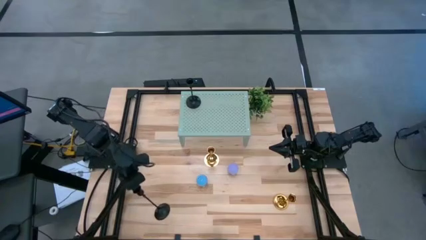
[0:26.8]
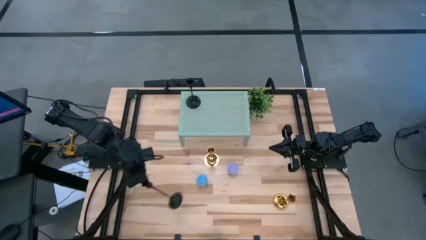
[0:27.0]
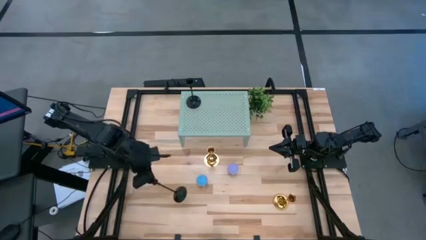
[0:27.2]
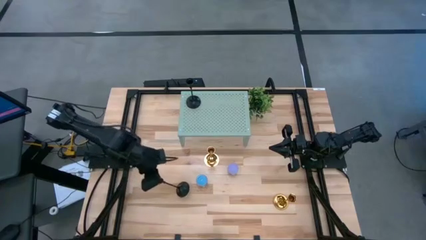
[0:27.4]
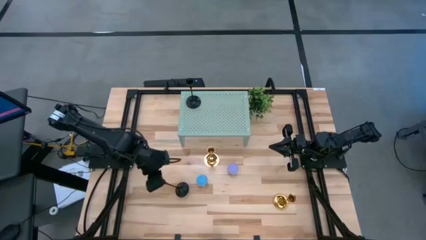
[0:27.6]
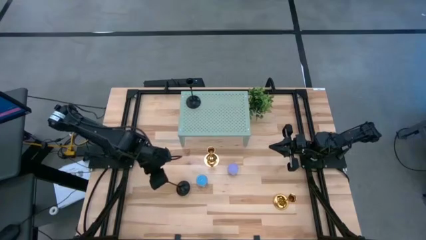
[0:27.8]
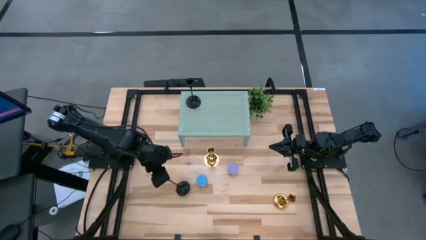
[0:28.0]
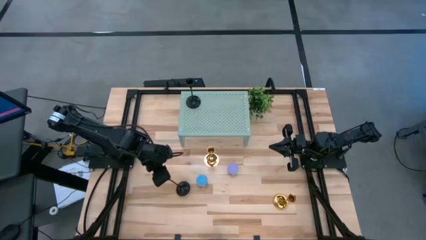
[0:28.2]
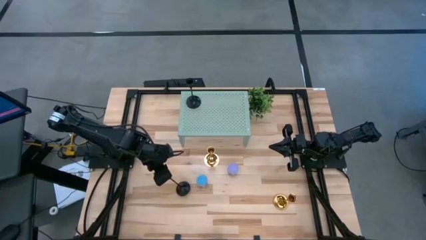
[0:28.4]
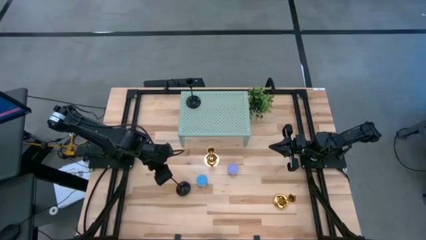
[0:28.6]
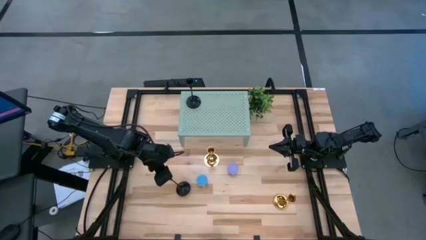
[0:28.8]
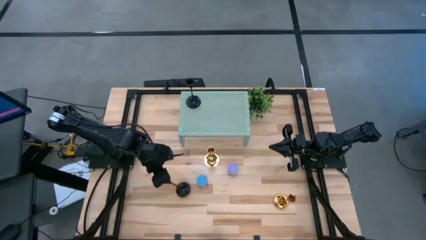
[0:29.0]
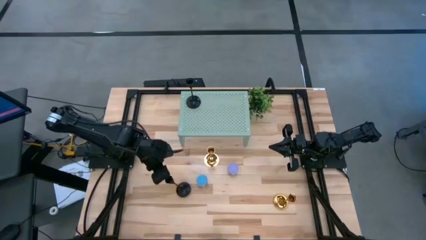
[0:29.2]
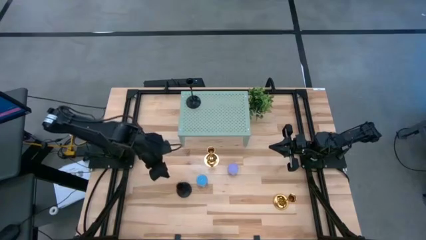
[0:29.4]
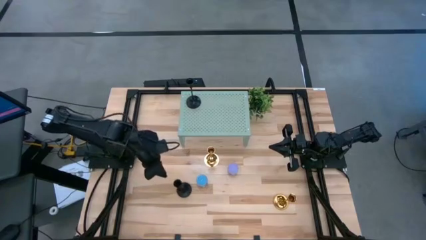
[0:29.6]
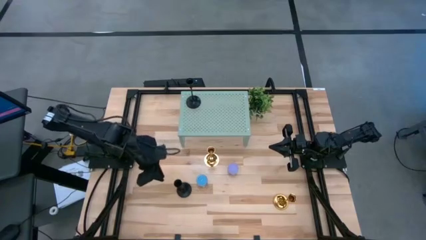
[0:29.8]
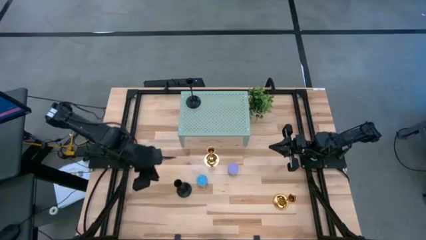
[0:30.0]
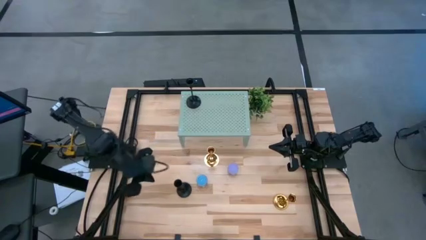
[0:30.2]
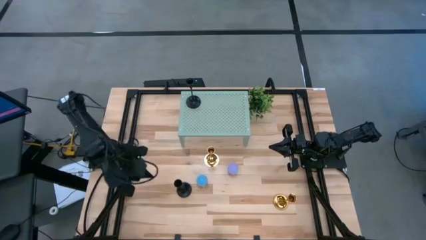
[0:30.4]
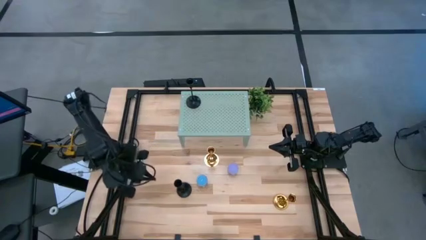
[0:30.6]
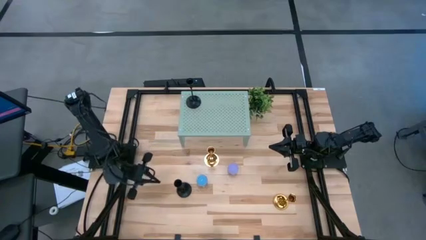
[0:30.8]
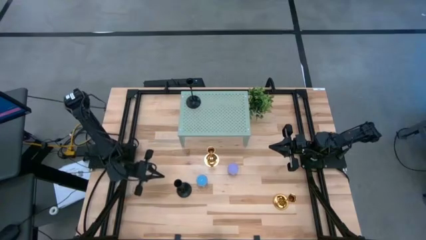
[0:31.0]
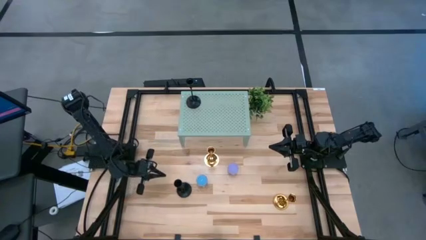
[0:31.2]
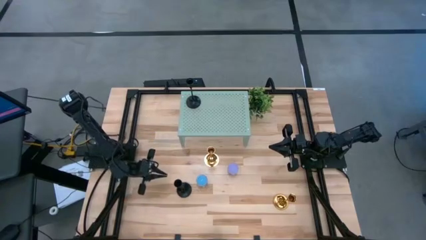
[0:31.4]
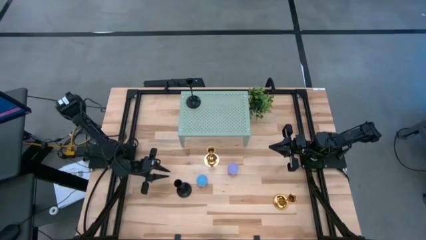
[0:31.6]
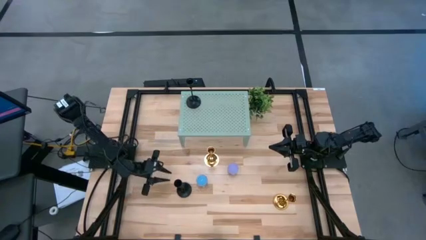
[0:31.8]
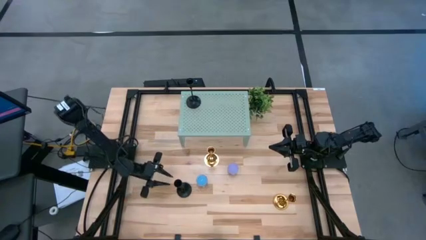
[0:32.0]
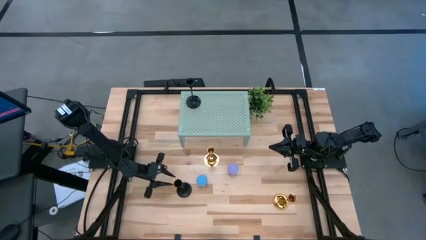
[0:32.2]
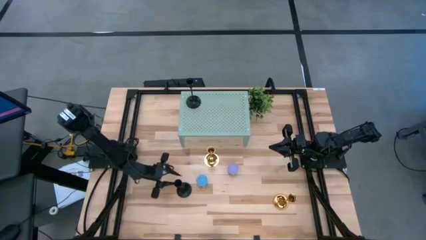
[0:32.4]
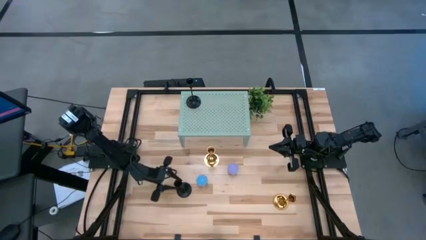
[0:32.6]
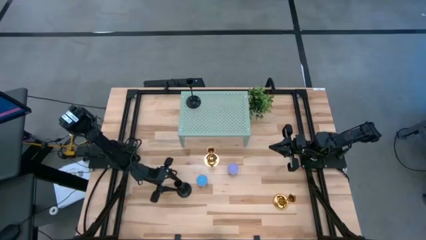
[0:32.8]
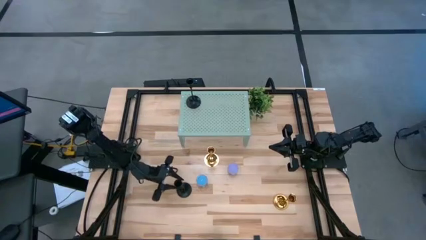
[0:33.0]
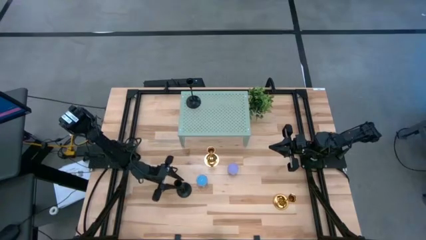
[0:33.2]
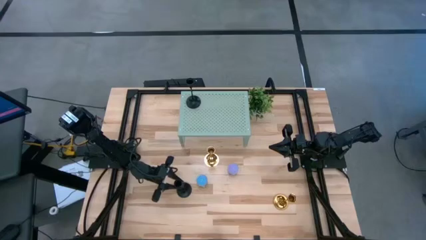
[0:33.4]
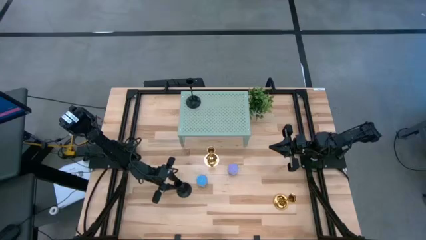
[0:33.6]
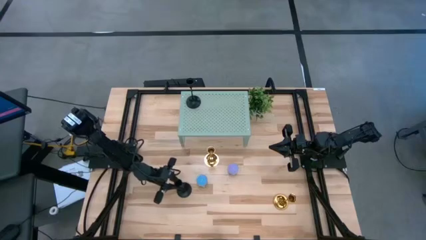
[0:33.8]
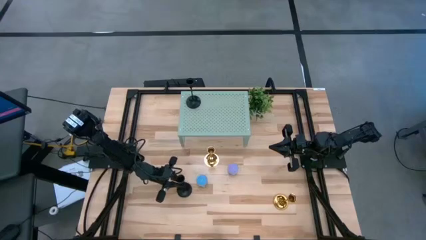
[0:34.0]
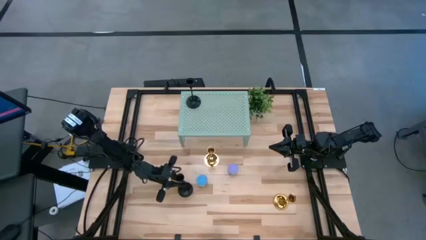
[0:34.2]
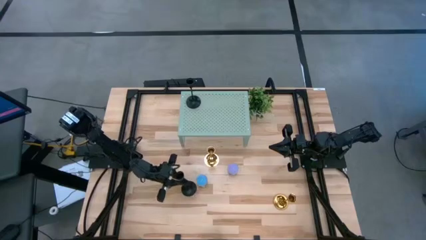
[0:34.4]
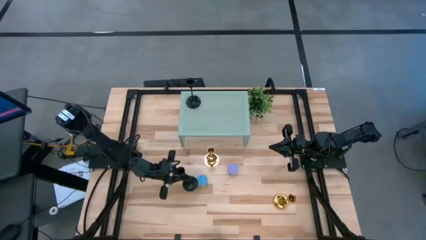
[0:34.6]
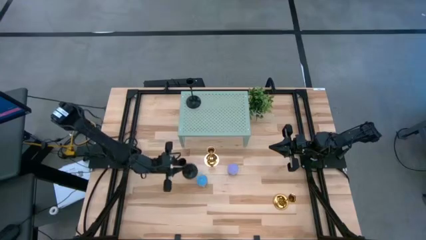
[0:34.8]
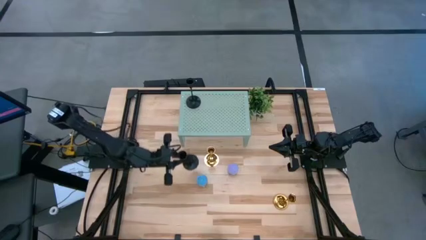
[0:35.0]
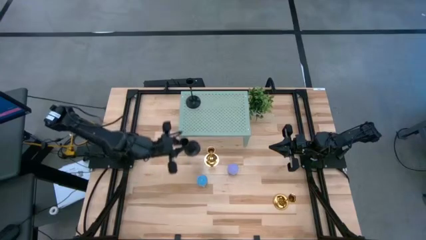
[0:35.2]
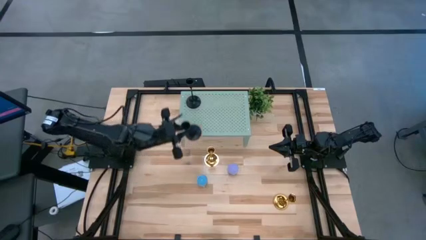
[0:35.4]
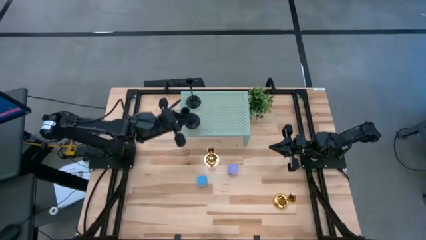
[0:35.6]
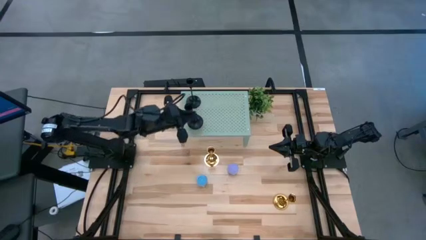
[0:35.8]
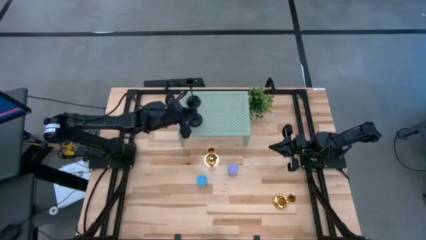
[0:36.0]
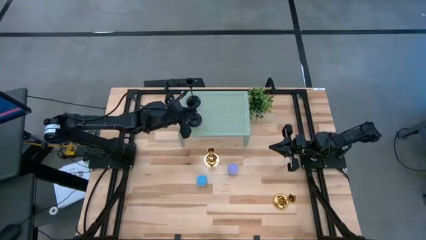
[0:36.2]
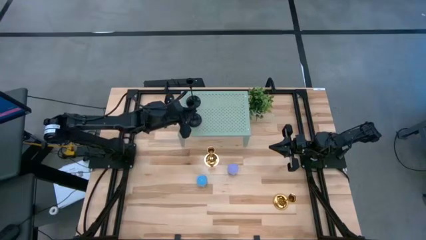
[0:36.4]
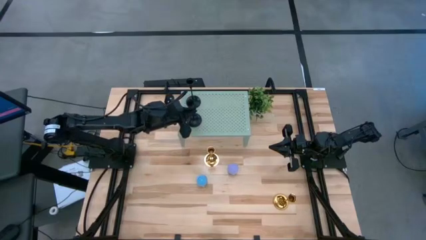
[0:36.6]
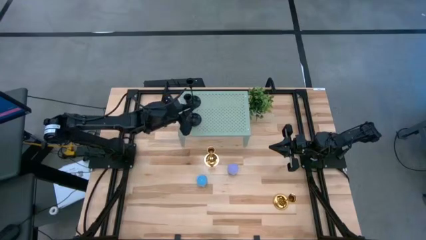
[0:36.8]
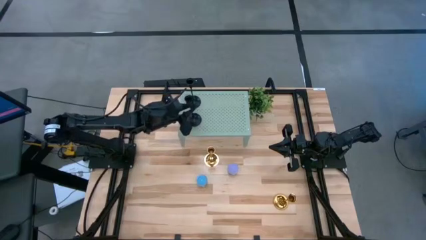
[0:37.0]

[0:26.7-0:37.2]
Task: Pick & Place candle stick holders
Put the black candle holder on the shelf
